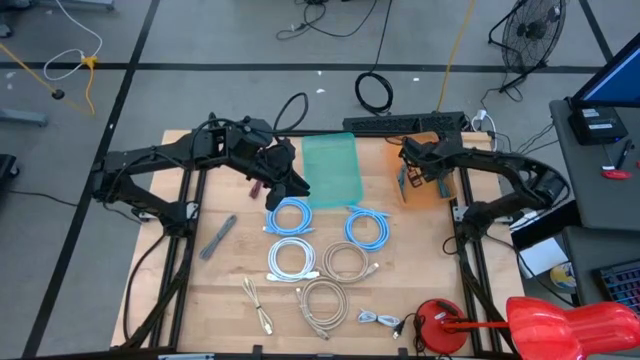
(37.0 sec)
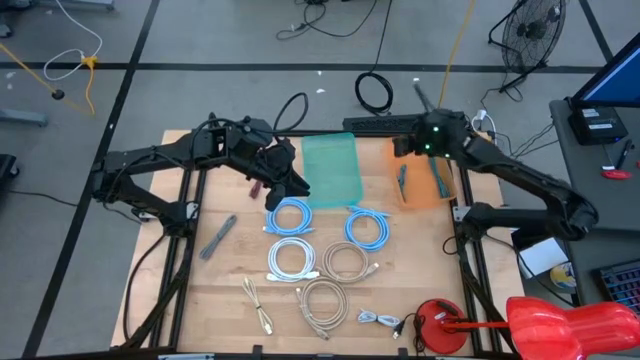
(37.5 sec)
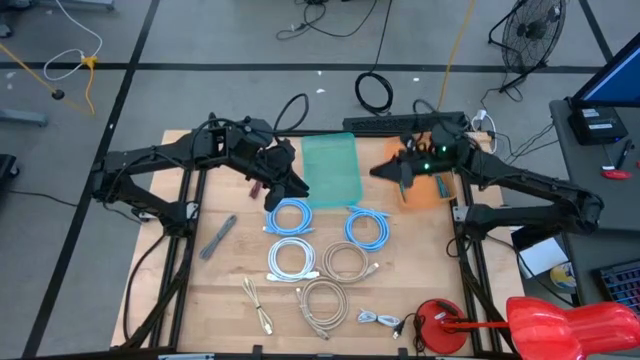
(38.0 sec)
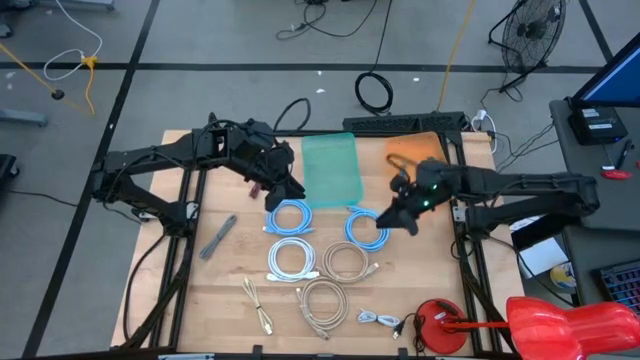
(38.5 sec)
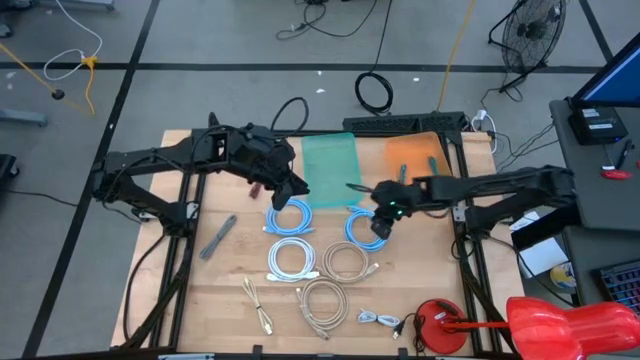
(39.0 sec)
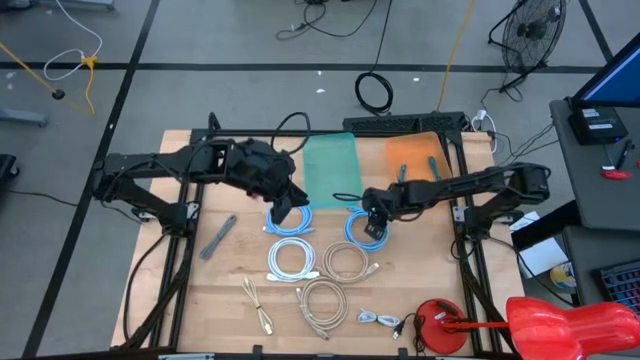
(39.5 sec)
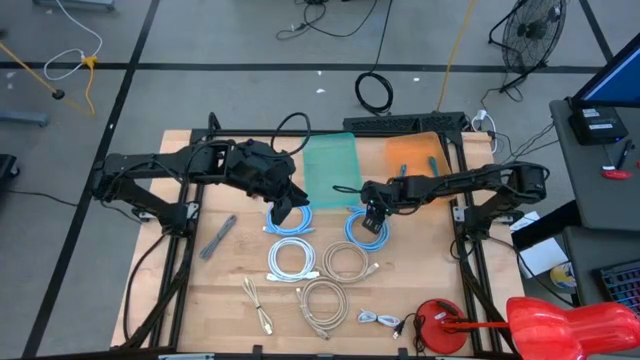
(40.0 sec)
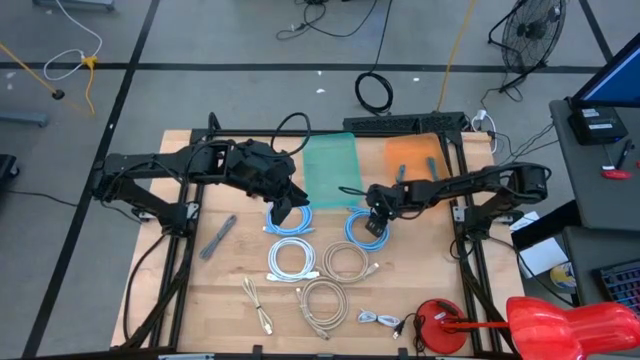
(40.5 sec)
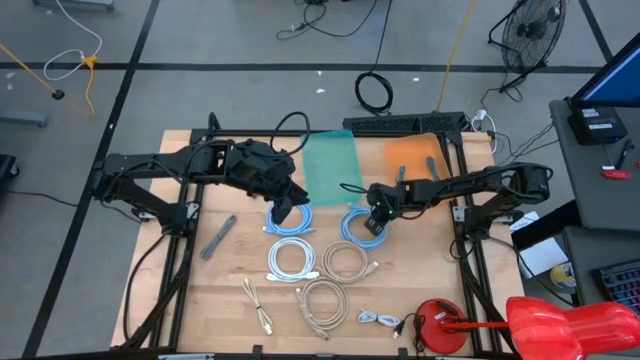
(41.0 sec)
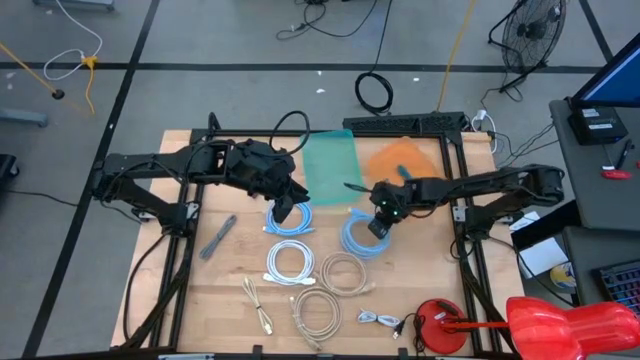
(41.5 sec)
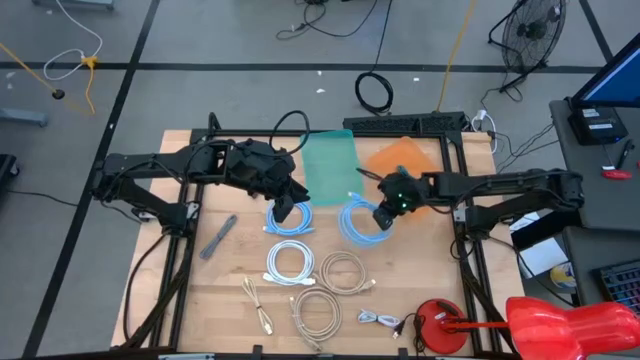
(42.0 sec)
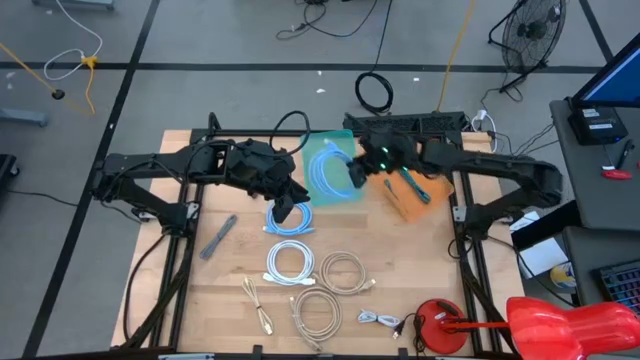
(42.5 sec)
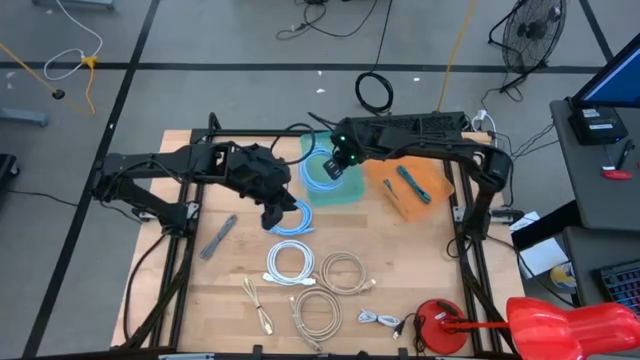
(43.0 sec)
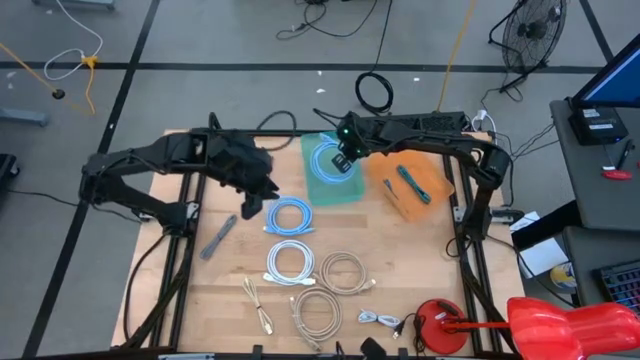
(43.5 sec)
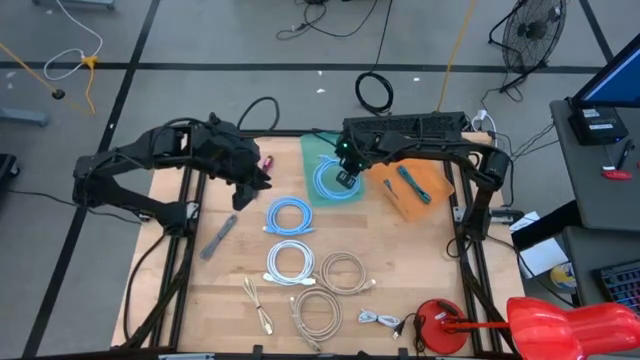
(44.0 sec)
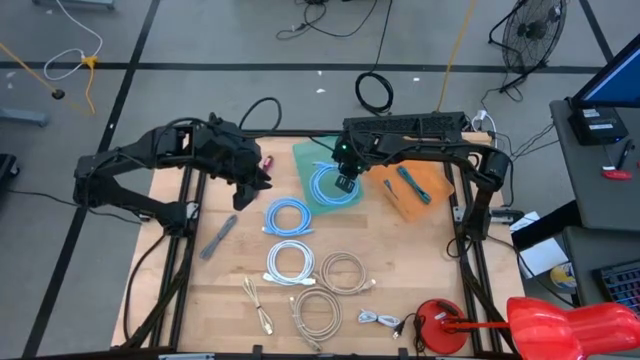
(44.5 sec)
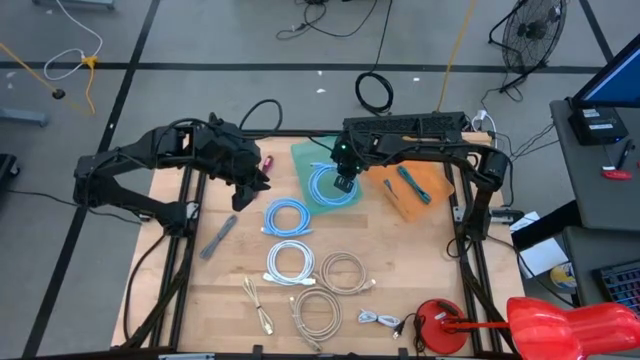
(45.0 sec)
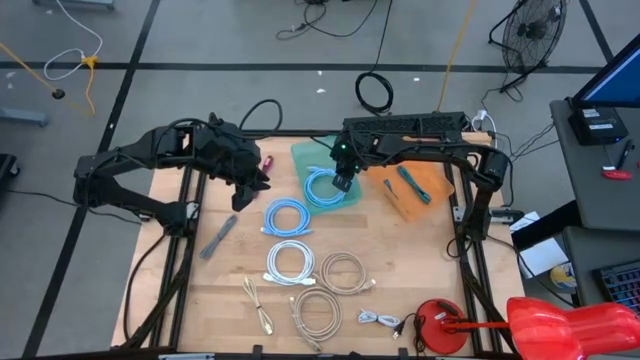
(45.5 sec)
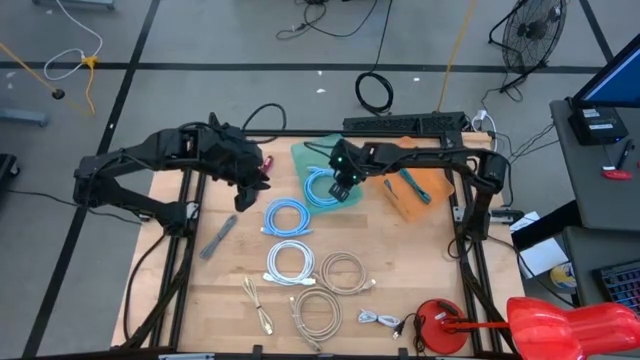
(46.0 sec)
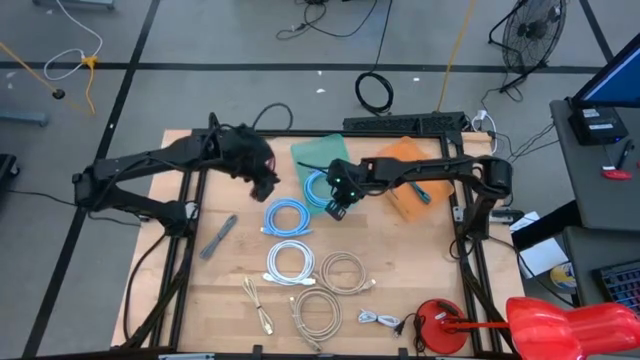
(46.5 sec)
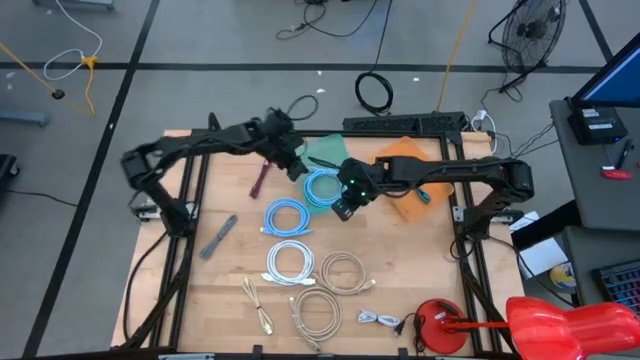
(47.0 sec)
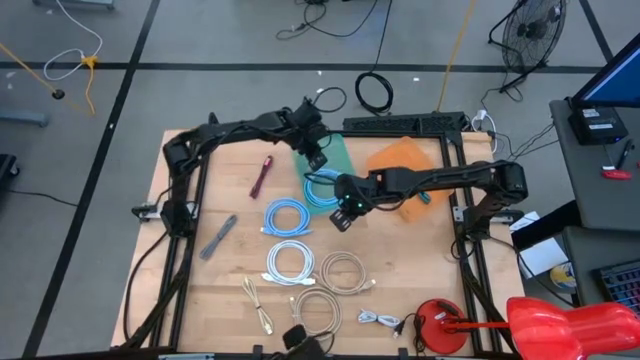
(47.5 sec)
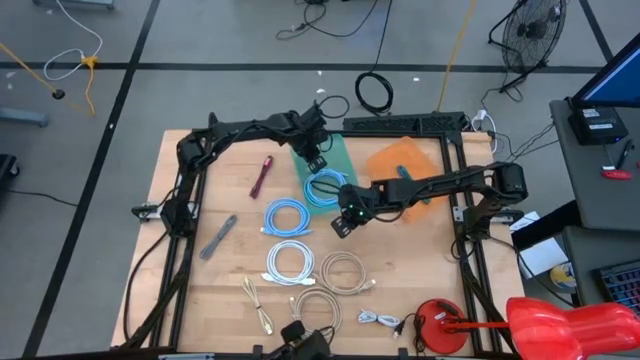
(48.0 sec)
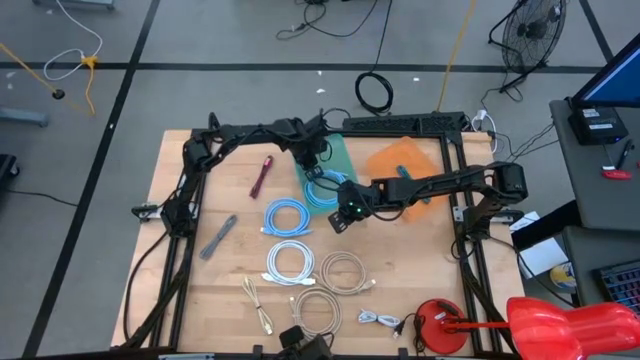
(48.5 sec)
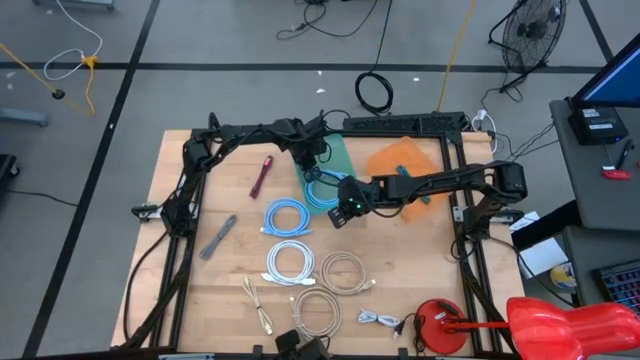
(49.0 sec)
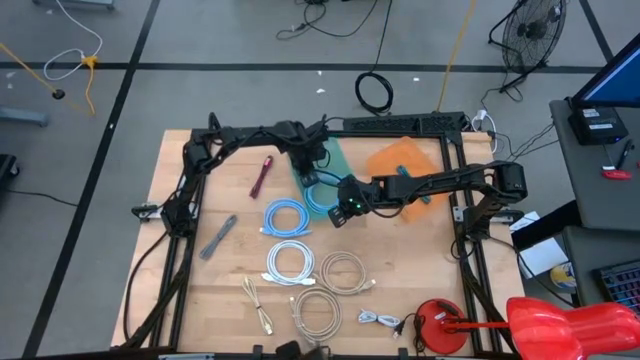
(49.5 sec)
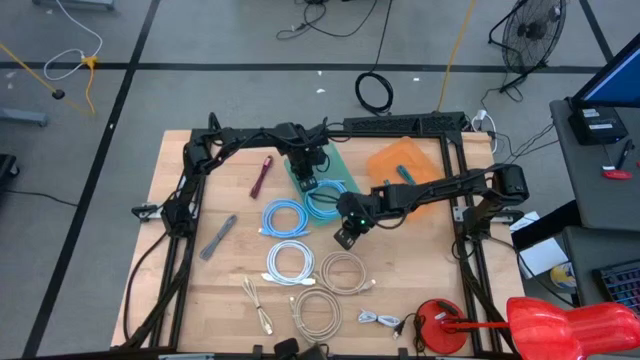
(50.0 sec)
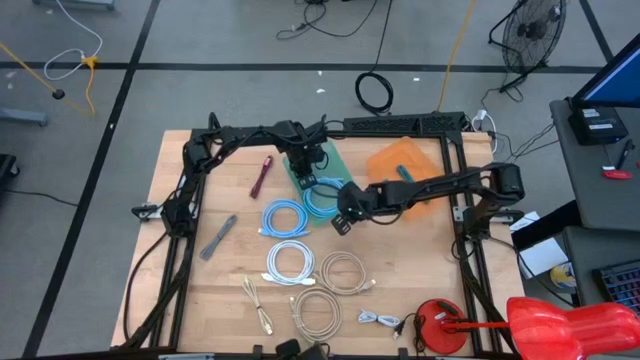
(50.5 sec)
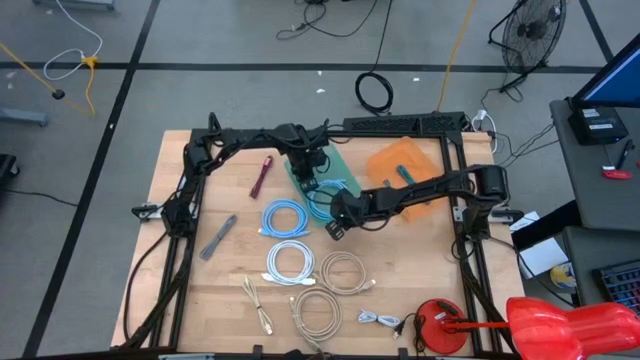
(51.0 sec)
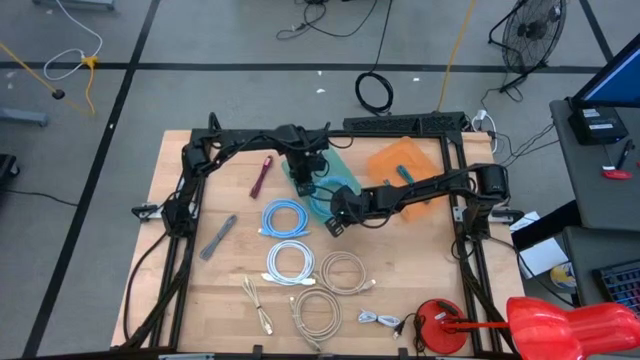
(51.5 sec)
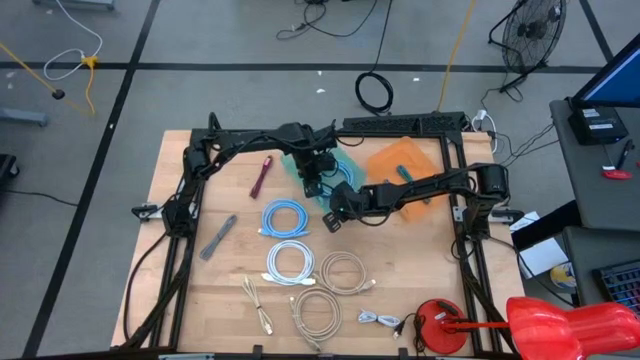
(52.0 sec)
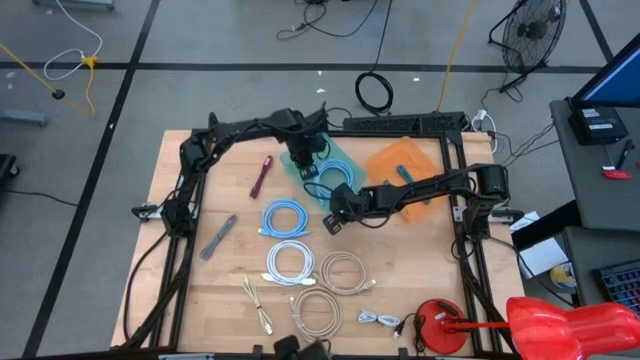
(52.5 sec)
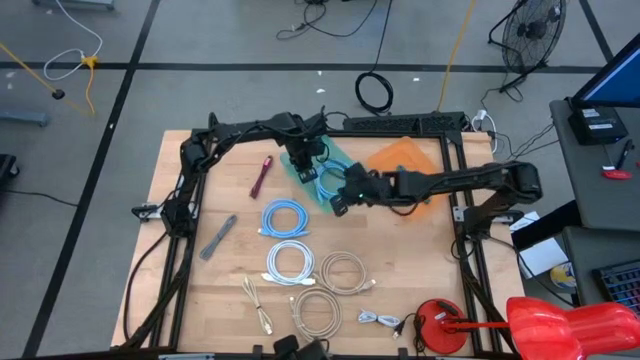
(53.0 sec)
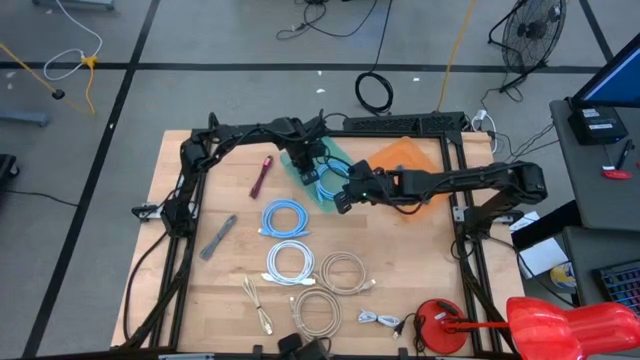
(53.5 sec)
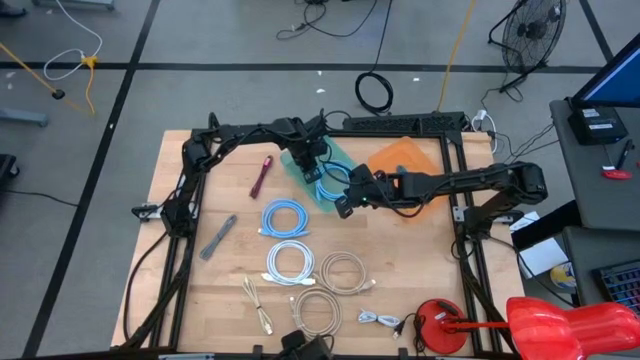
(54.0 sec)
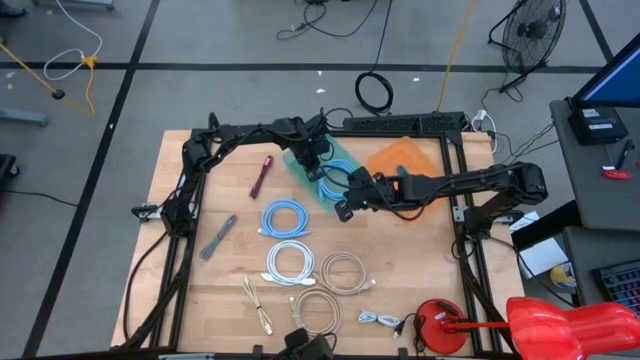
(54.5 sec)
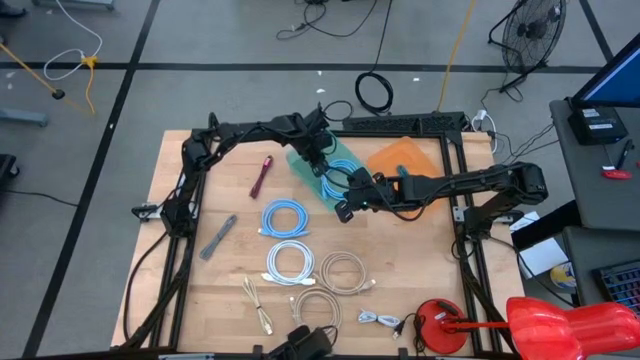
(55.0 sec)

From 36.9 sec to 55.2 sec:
Task: Pick & Place USB Port
Put the right light blue charger cable into the green bin

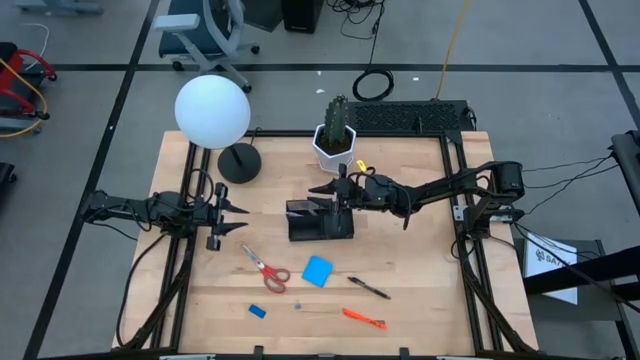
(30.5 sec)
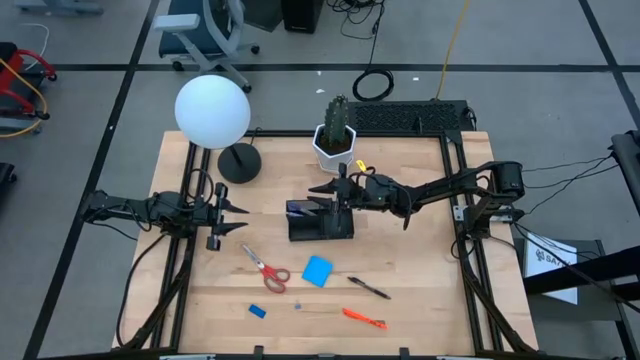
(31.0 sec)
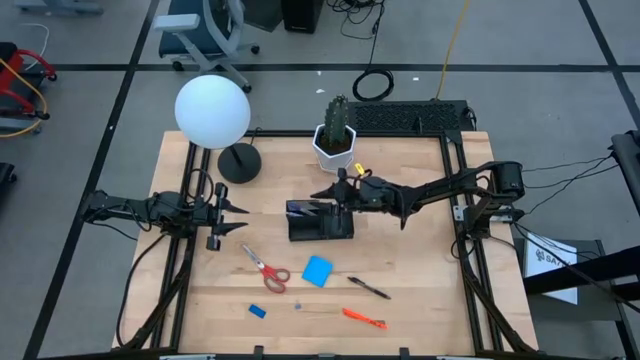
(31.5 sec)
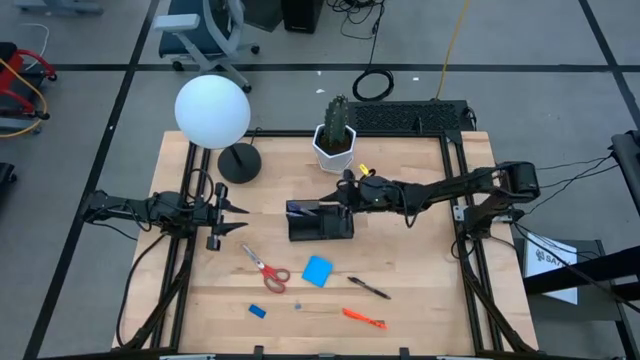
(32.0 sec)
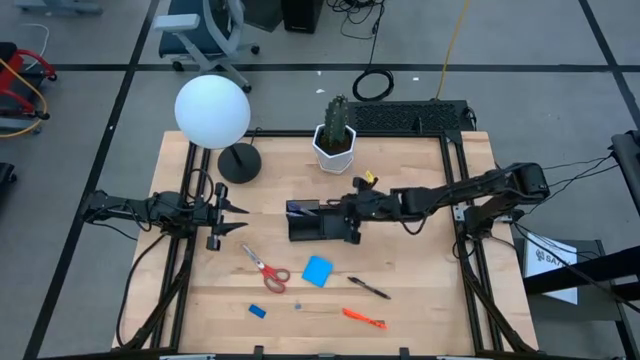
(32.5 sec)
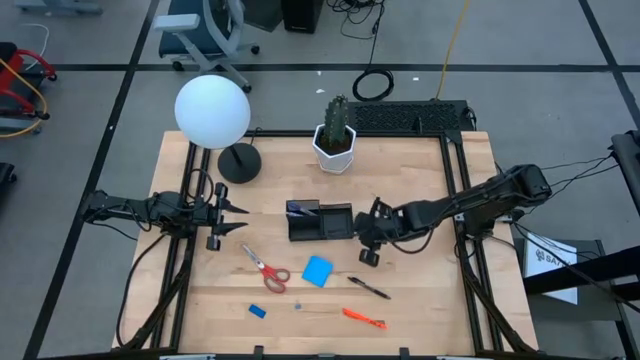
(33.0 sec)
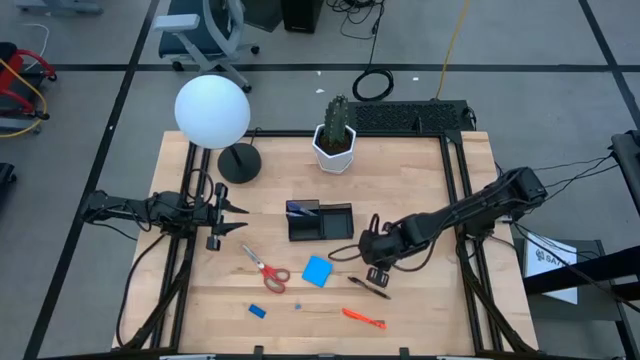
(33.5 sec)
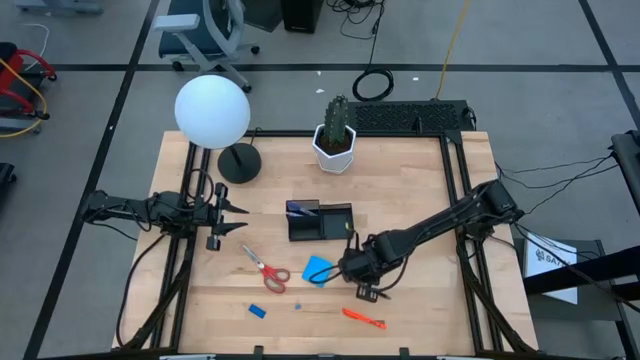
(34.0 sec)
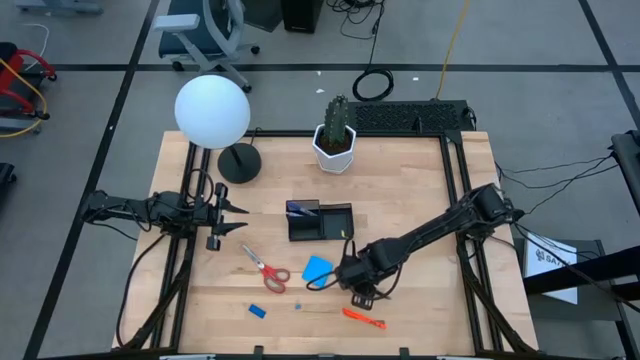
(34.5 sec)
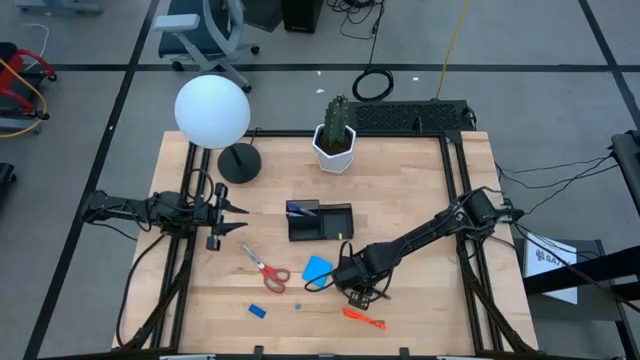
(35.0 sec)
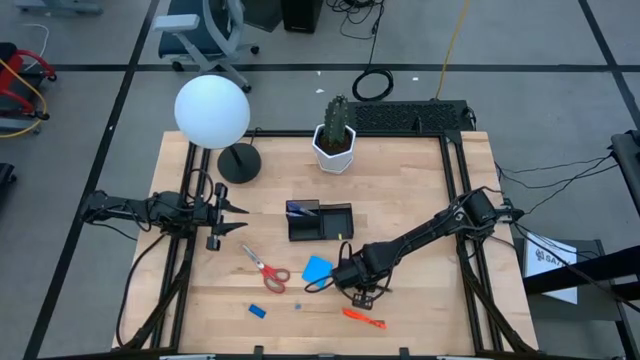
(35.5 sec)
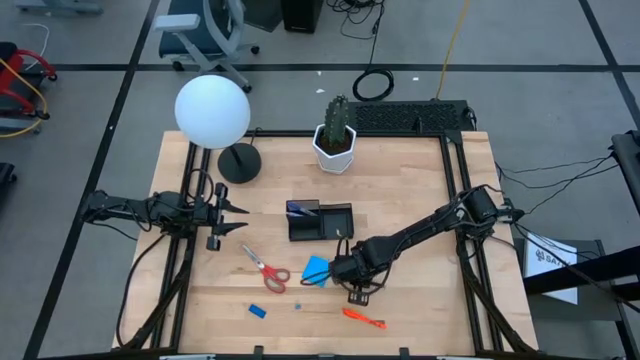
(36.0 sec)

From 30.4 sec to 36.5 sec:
Task: Pick and place office supplies into organizer
Put the black pen into the black desk organizer
